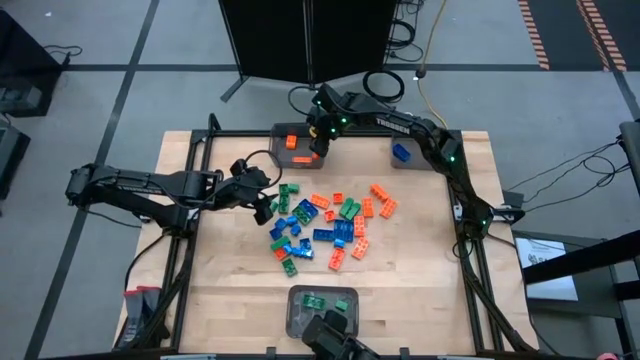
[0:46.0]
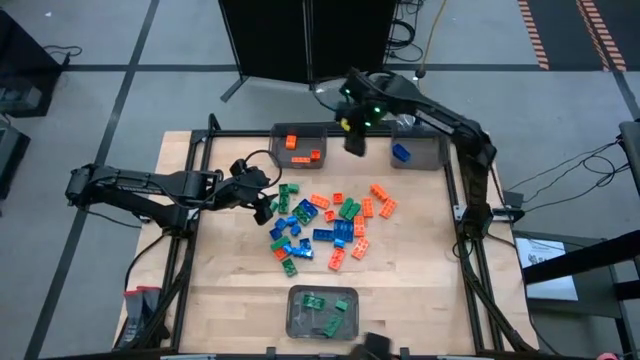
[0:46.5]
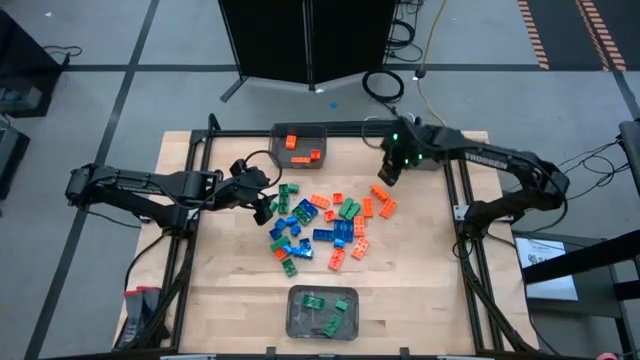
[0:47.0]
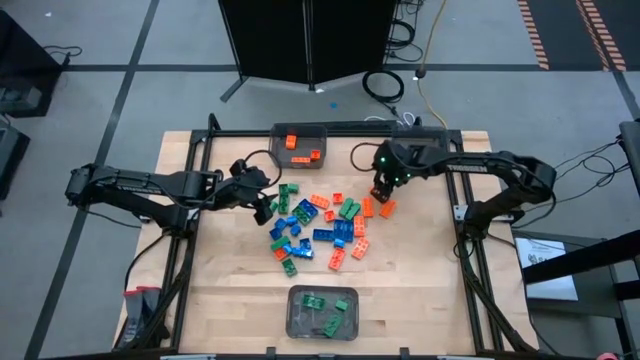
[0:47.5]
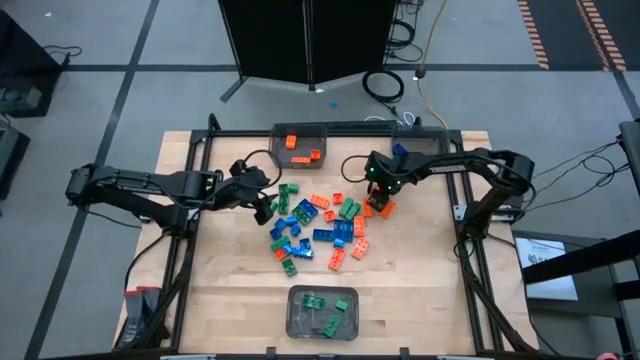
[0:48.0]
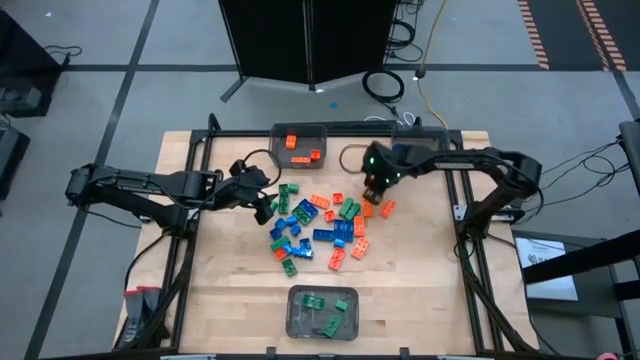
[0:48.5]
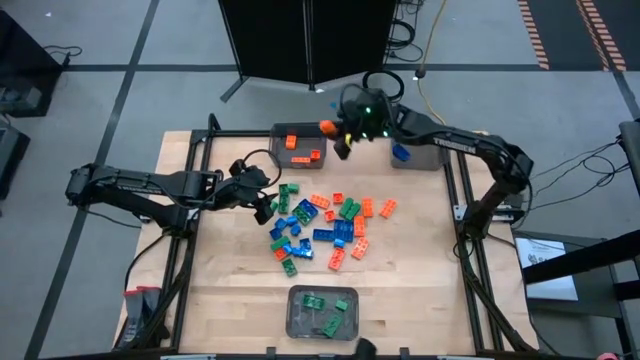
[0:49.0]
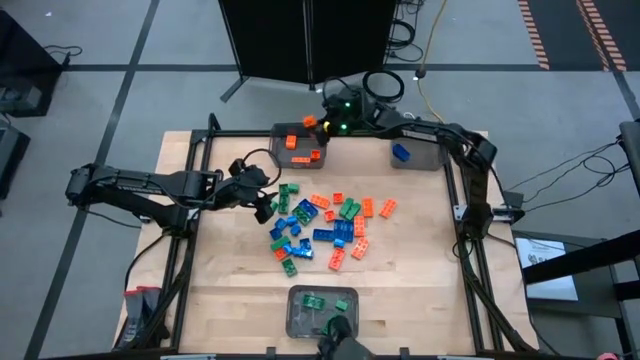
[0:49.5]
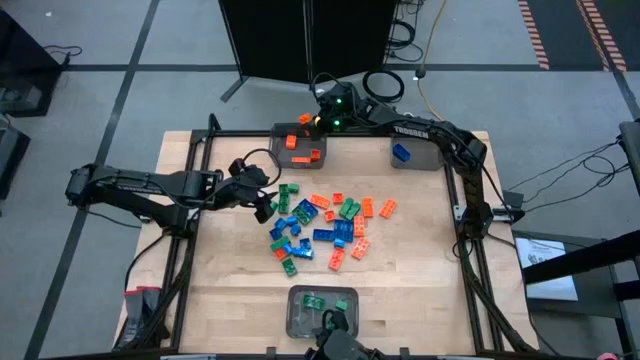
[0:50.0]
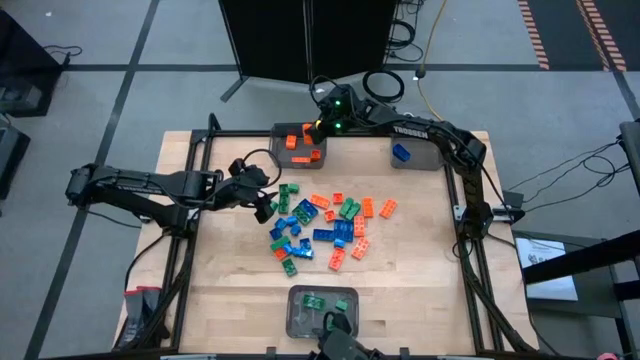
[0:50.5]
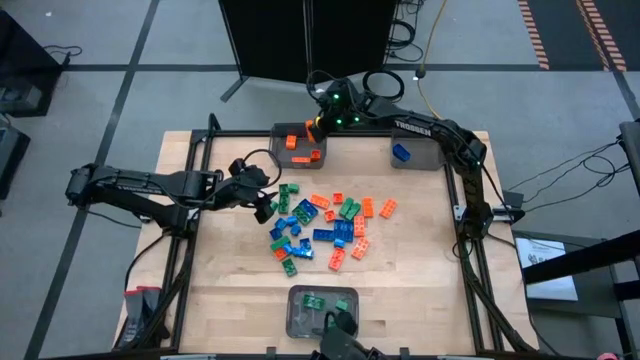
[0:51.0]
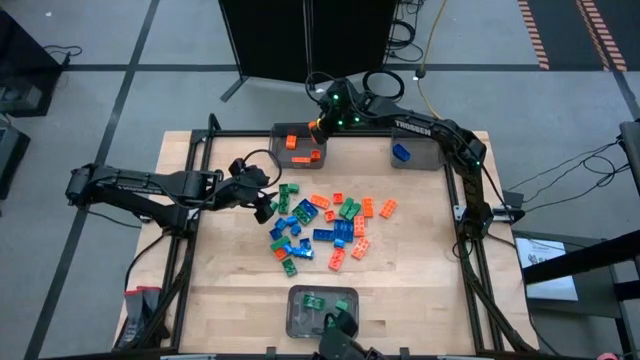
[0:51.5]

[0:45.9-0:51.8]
Task: Sort blocks
Put the orange game piece into the top left black bin

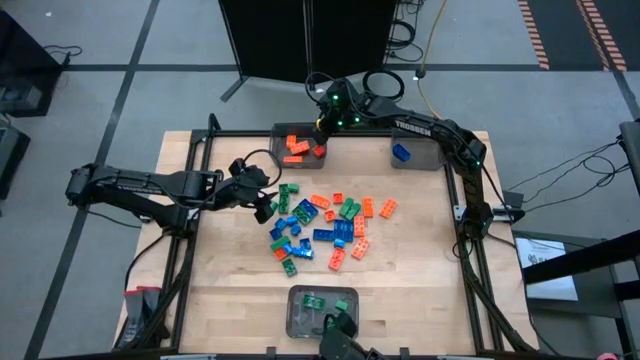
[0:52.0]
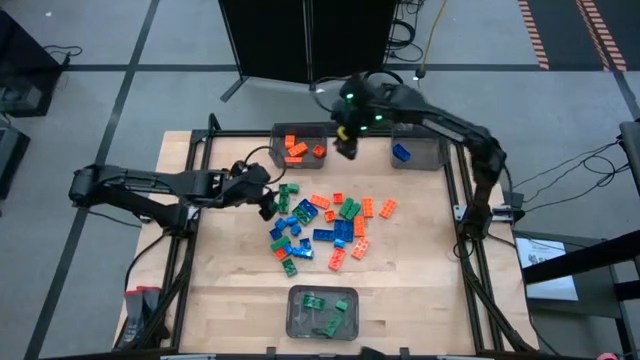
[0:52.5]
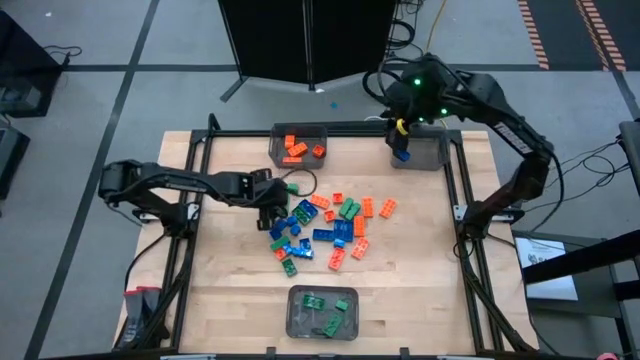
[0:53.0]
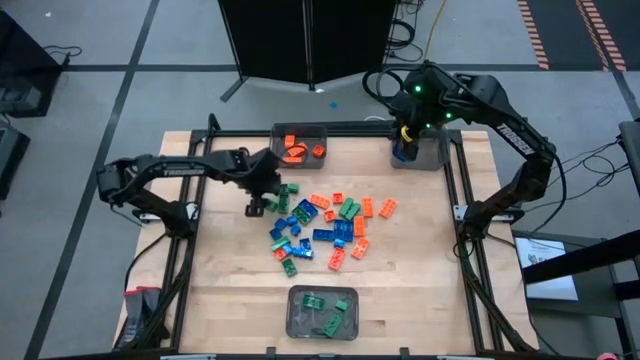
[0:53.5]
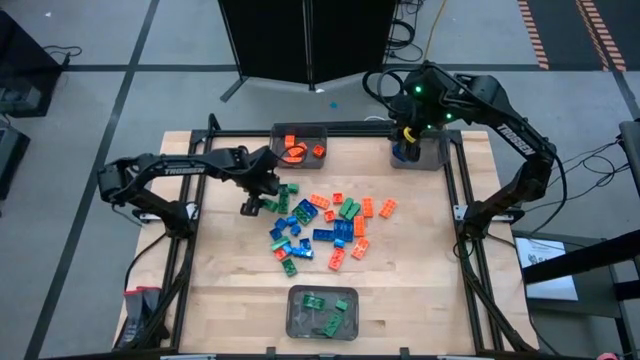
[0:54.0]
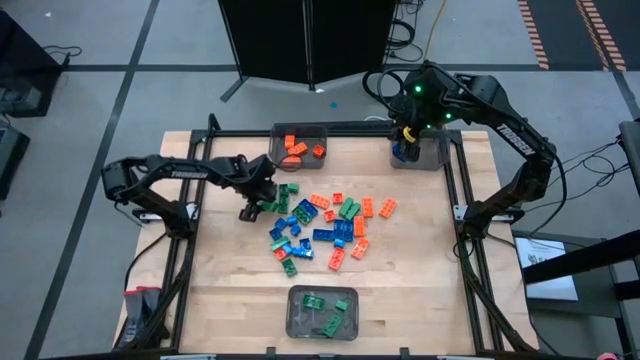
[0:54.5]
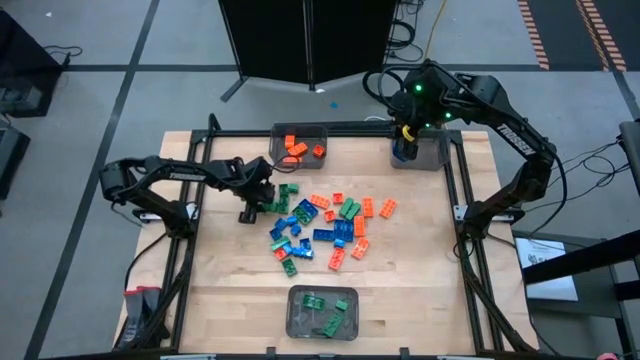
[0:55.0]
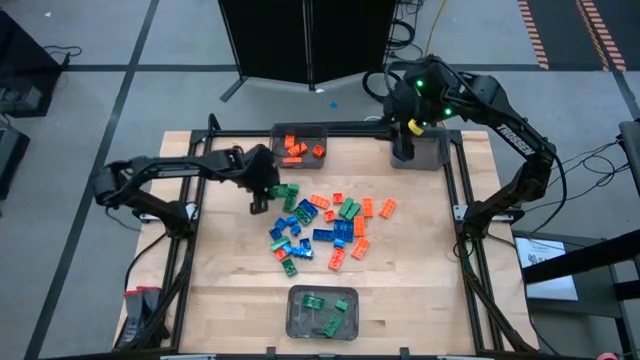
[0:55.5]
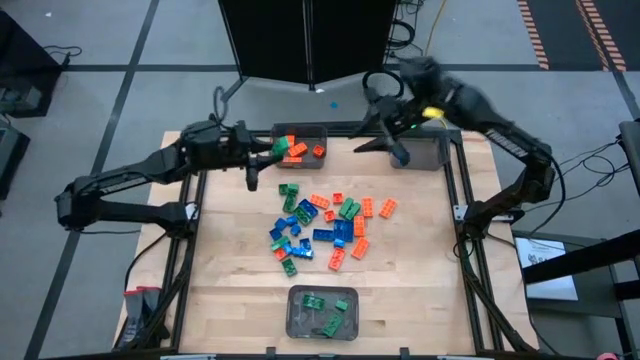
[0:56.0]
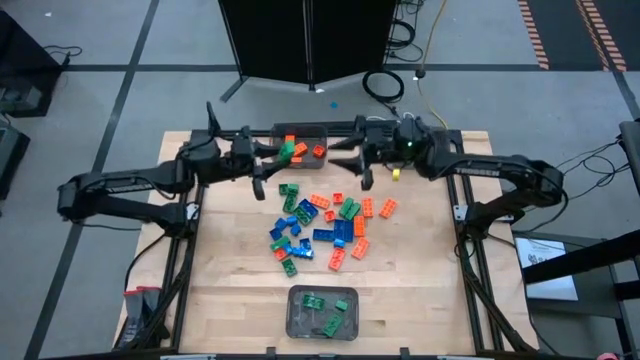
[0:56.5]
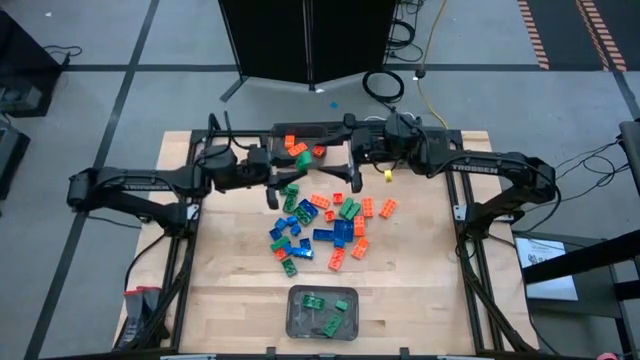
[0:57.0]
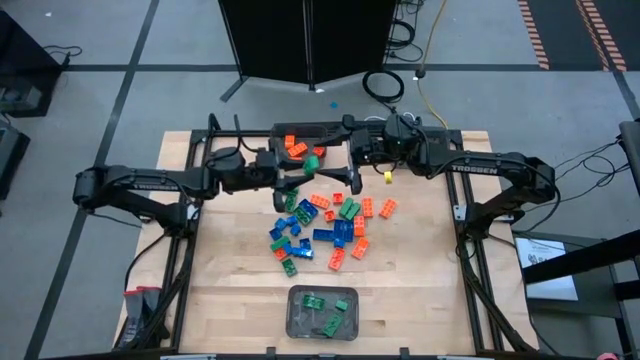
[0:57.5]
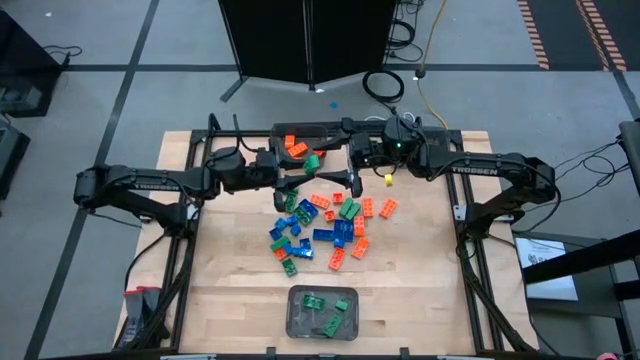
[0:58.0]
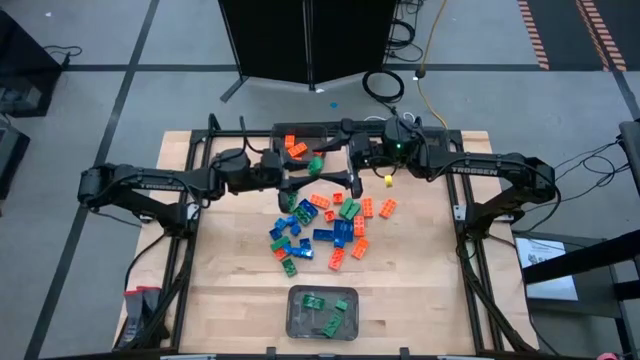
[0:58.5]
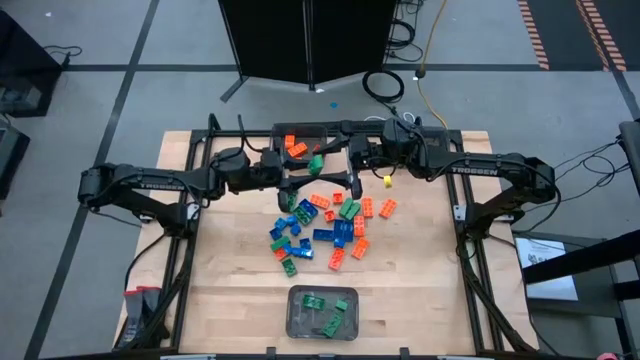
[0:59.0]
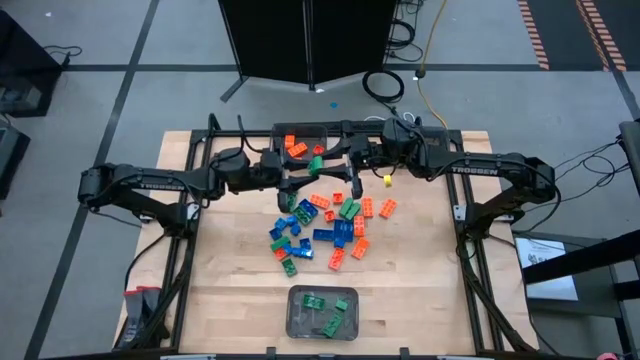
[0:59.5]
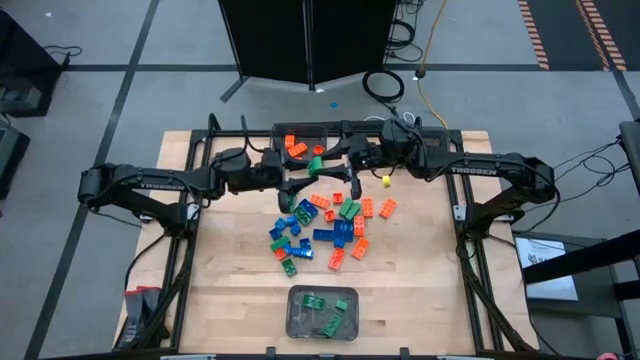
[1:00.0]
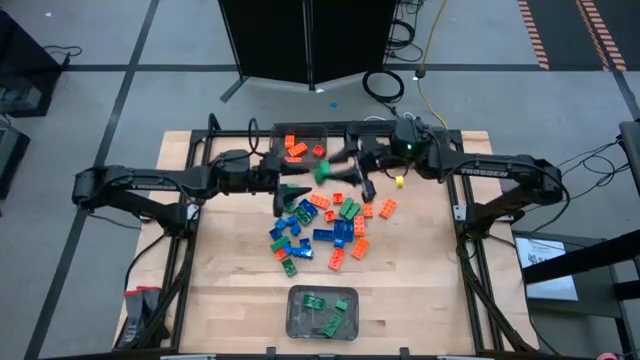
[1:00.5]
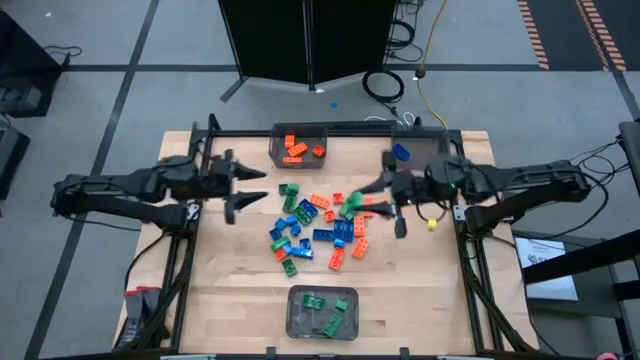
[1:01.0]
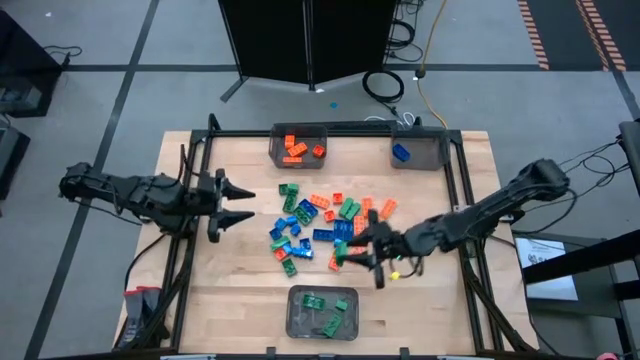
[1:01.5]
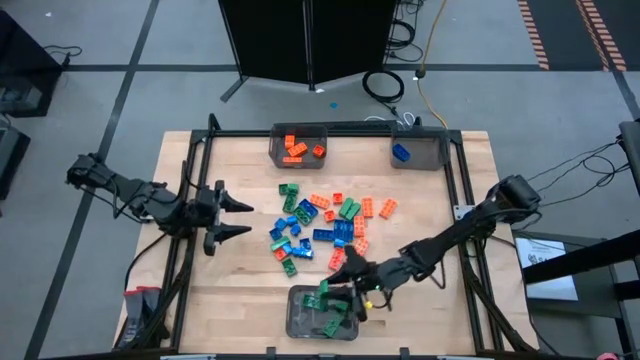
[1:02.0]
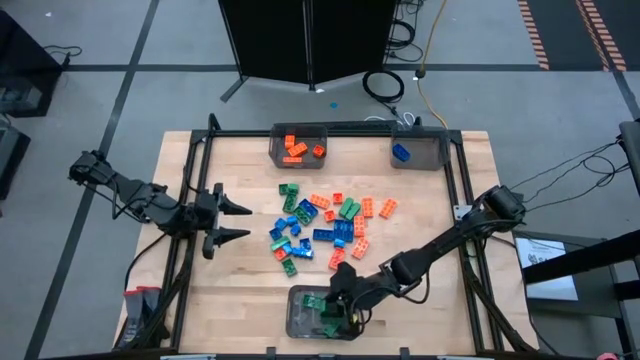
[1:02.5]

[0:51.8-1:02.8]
Put the green game piece into the bottom black bin

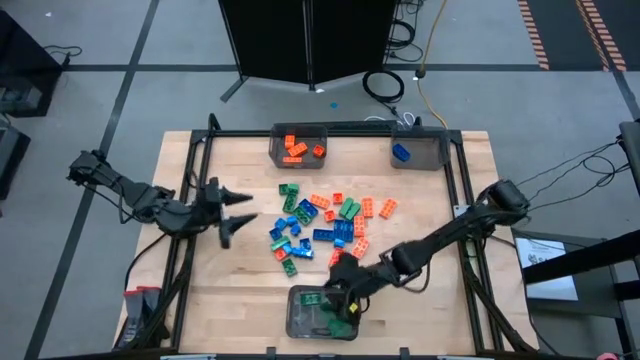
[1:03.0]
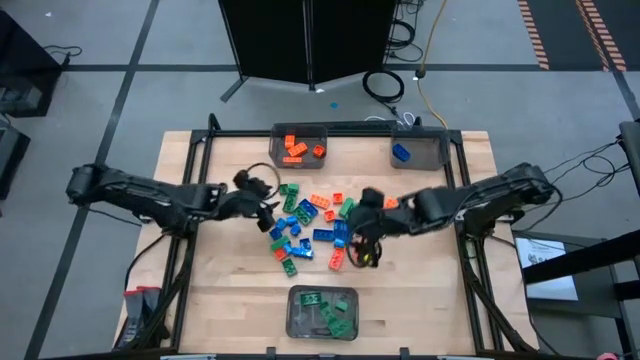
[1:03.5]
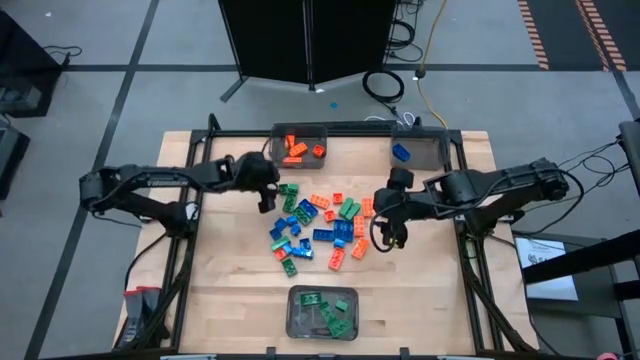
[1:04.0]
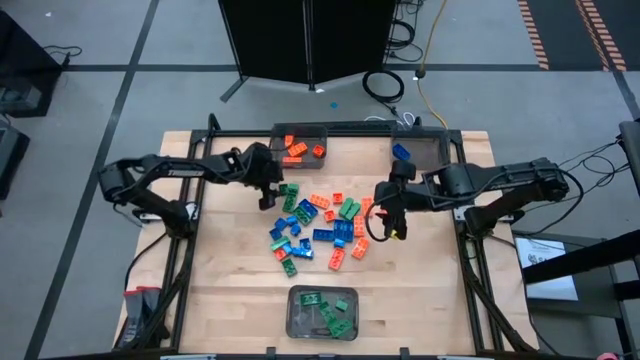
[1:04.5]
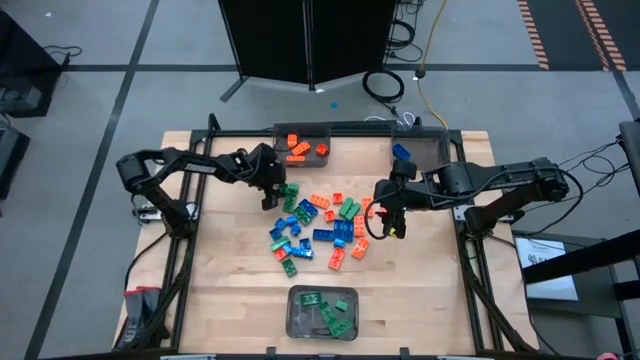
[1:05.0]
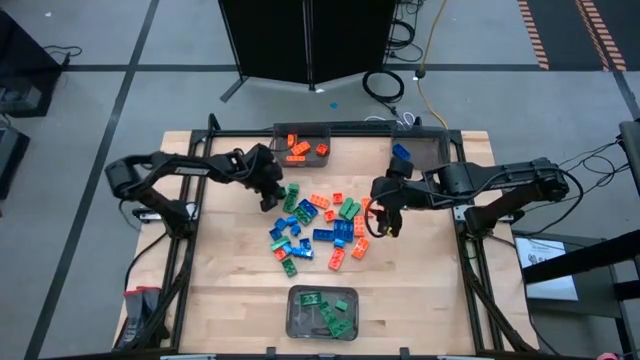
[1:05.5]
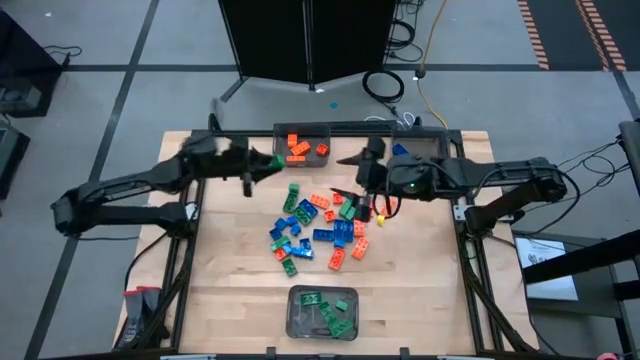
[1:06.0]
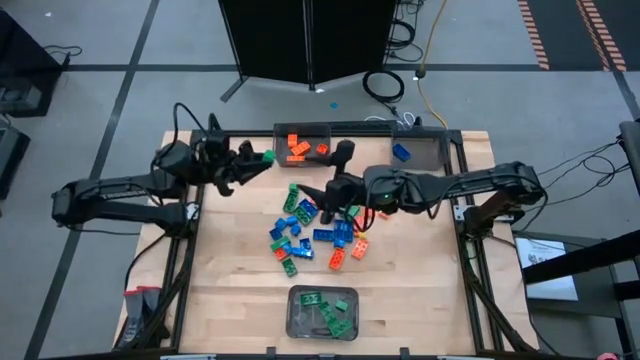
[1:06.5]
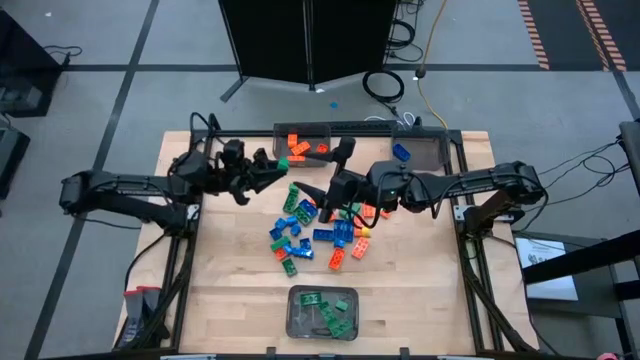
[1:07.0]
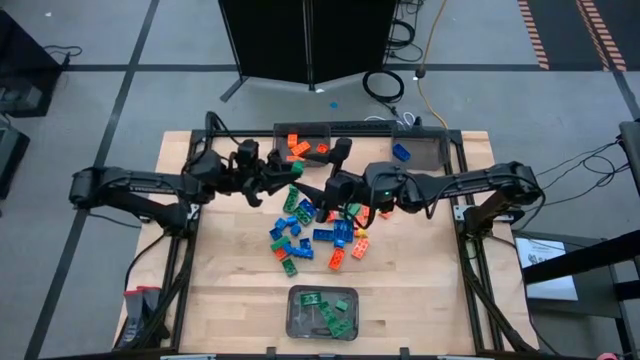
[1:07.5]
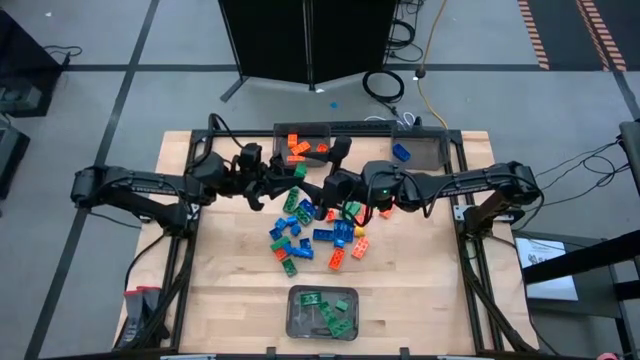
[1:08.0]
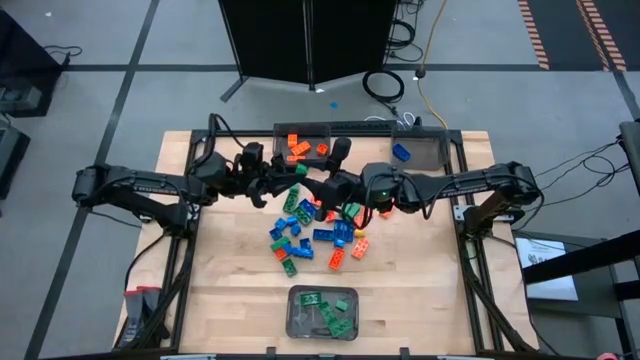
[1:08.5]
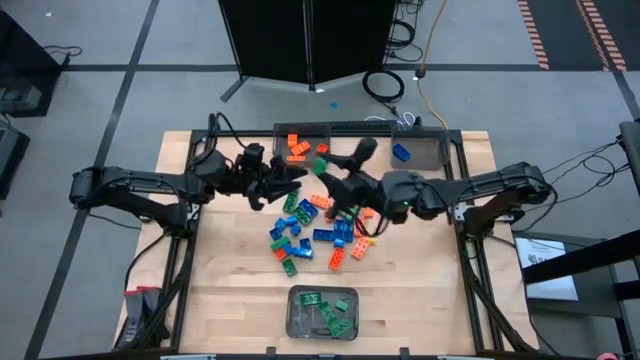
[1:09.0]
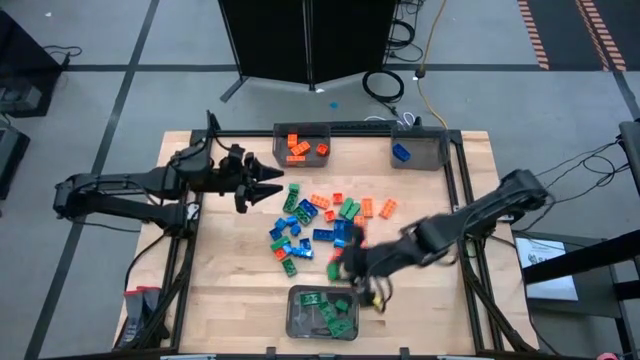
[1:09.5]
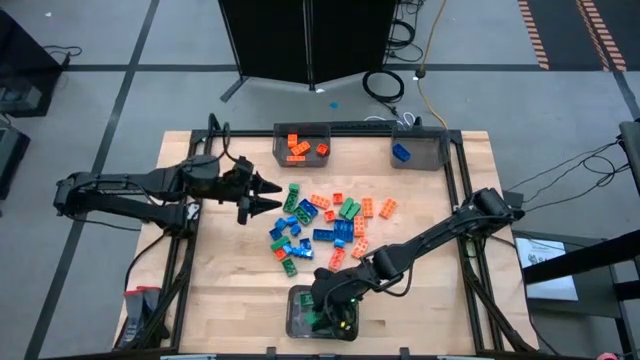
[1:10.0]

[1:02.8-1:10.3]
Put the green game piece into the bottom black bin
